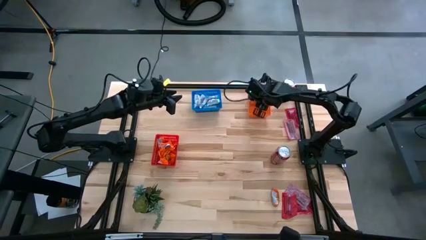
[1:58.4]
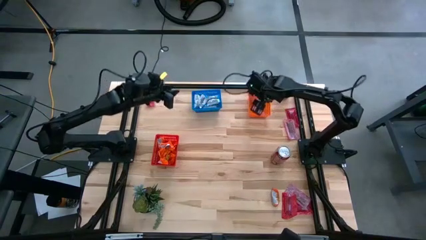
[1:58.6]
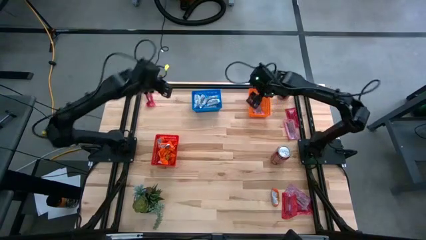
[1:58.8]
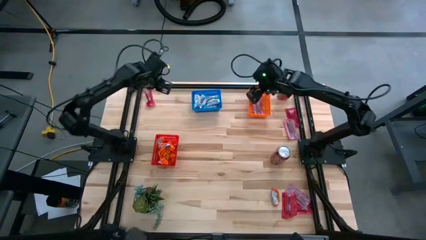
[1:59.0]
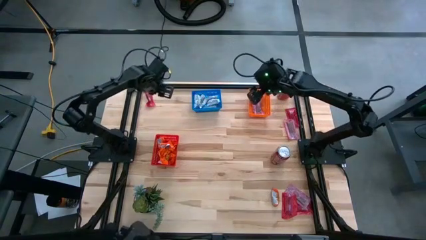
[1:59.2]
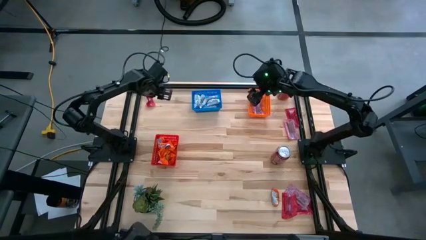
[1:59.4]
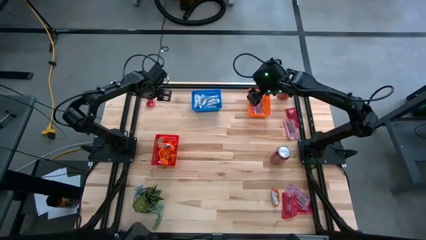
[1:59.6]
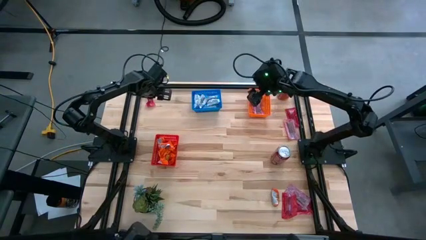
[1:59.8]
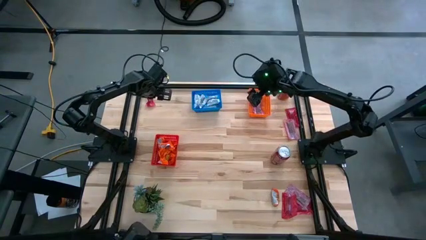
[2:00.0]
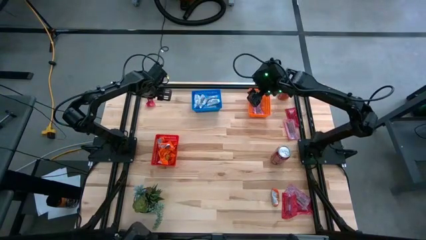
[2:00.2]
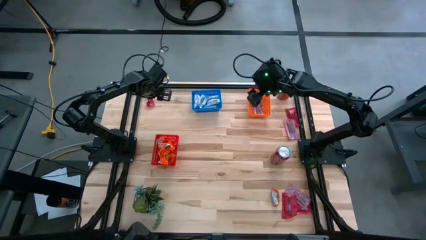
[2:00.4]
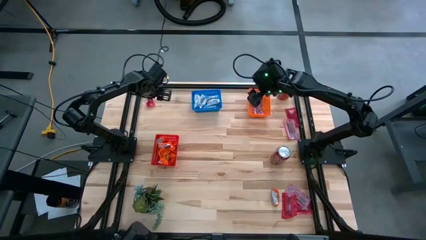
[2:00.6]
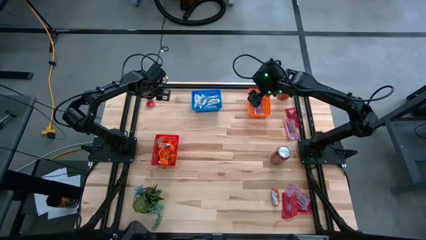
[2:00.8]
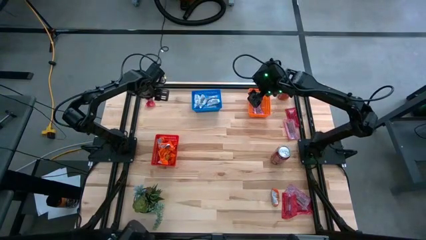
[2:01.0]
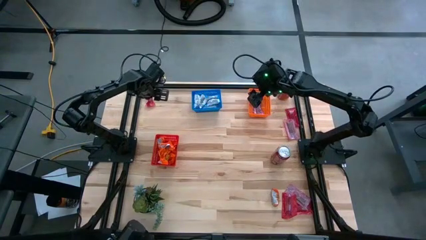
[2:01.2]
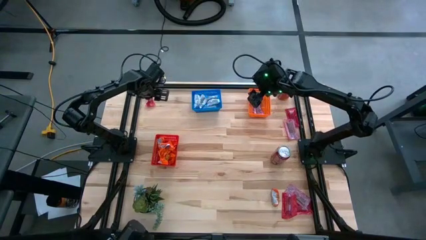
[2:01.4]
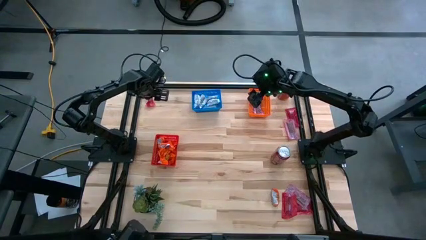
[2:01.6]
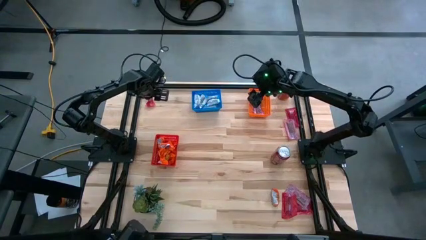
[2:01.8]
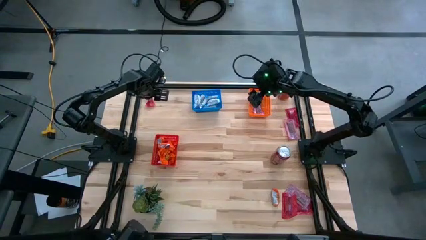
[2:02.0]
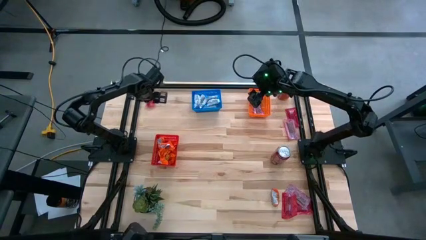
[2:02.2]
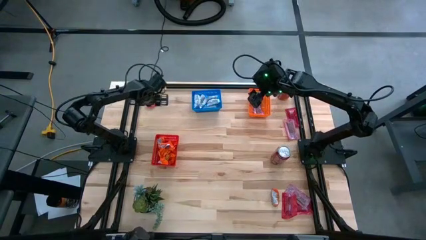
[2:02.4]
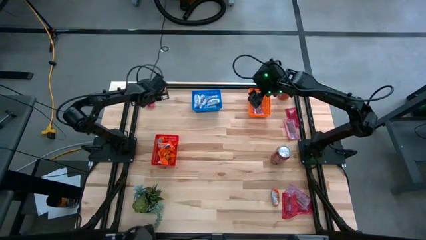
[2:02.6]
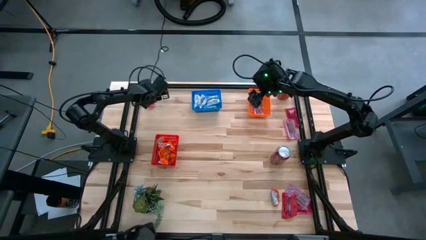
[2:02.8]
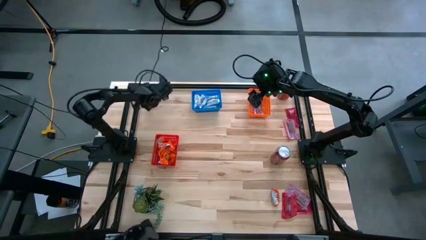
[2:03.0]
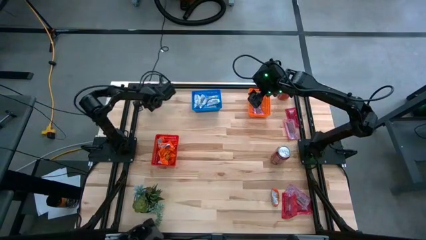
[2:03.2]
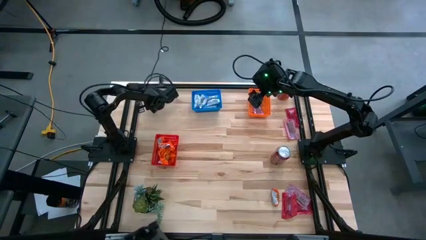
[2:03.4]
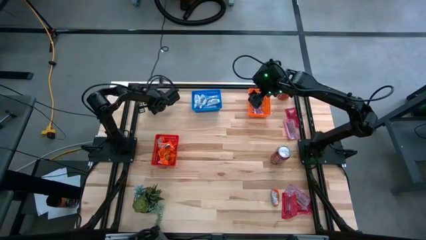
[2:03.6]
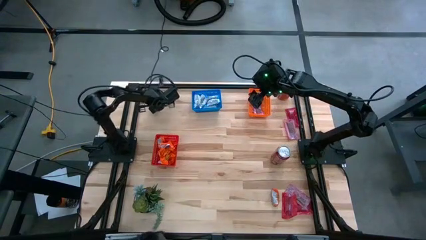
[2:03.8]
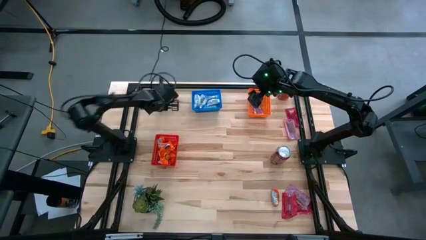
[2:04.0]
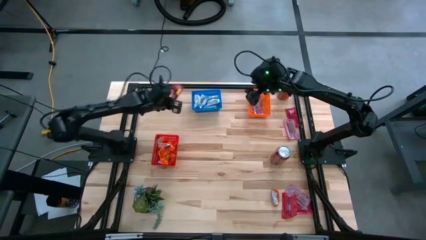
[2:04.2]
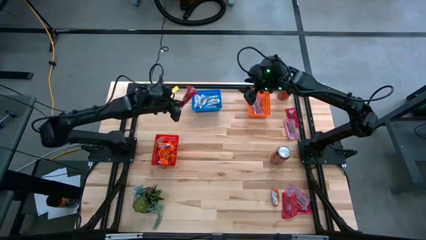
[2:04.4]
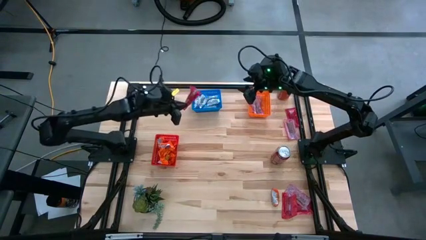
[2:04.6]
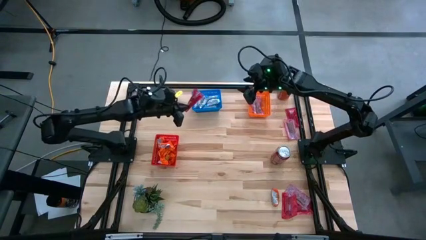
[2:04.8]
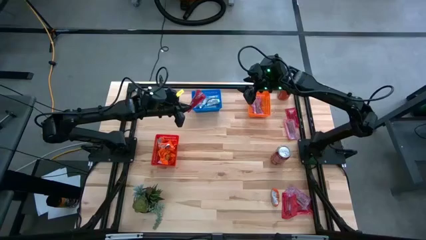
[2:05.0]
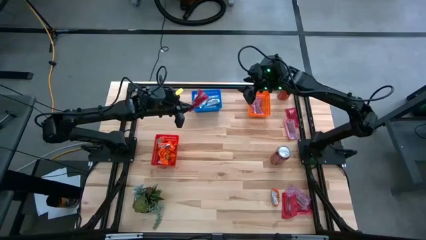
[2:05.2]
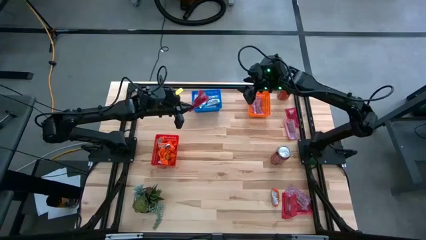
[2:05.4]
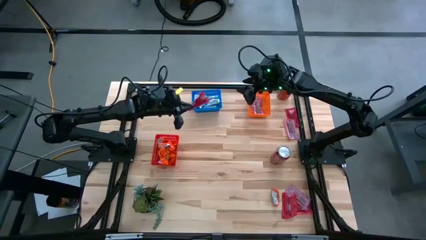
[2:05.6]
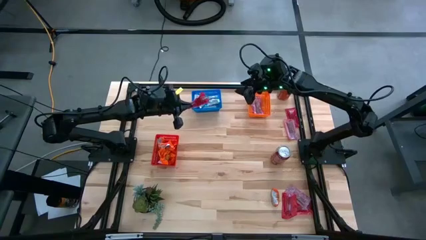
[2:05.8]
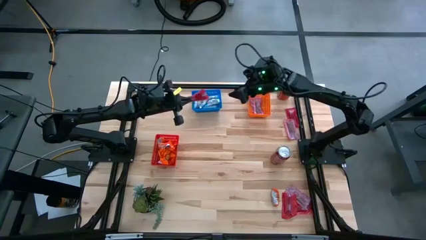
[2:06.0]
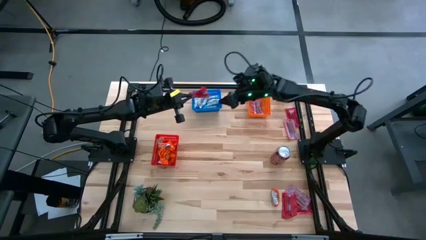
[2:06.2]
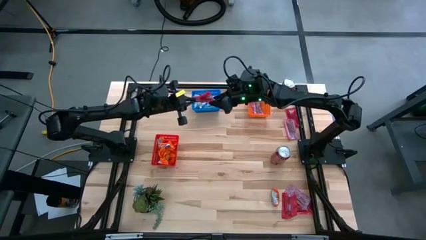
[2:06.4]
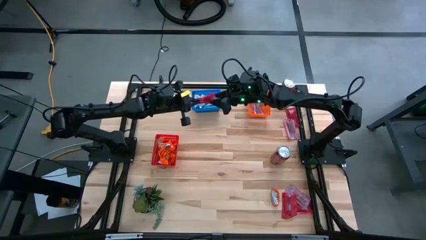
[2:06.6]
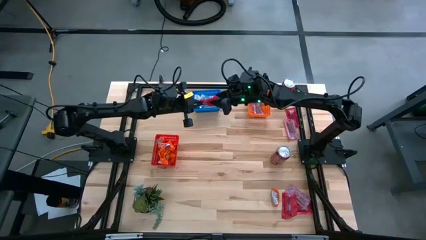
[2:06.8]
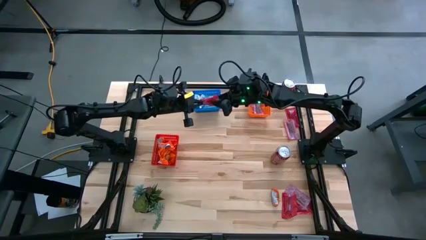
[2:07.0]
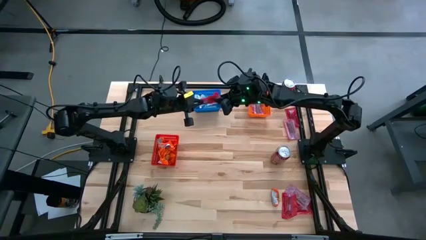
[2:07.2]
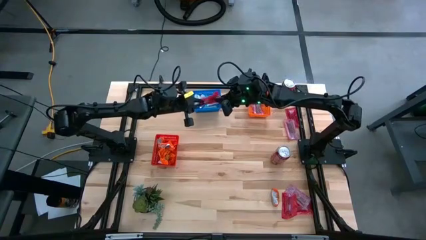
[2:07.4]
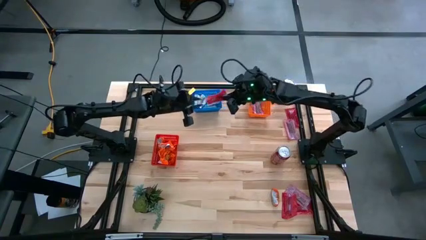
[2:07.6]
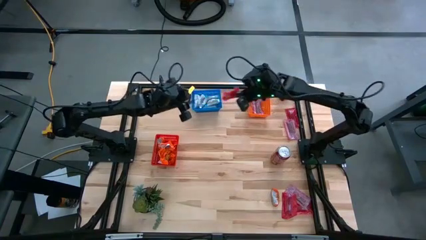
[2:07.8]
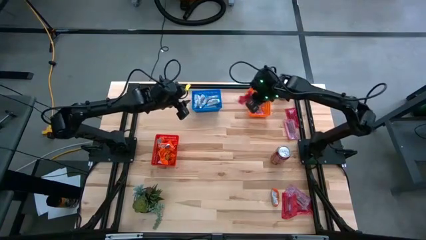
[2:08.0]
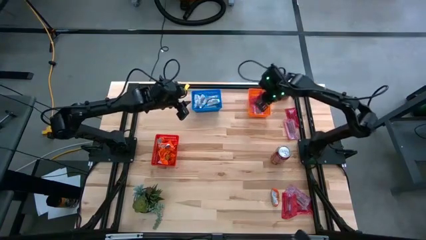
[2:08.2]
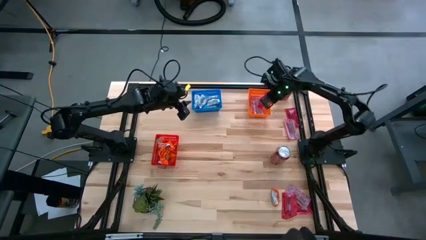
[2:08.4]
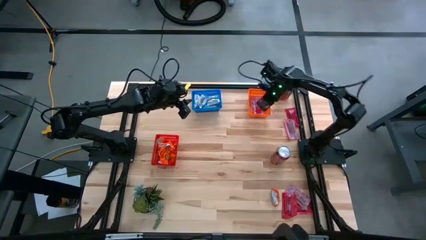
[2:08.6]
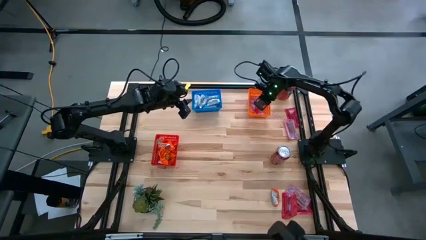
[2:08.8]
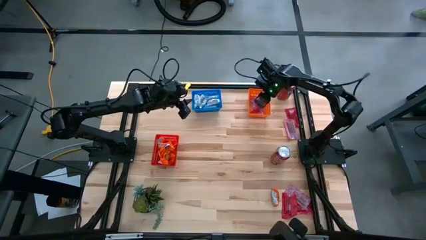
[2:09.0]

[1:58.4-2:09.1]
Task: Sort candy
Put the red candy pack into the orange basket

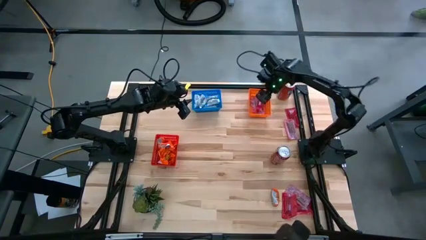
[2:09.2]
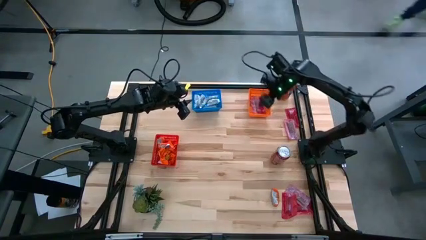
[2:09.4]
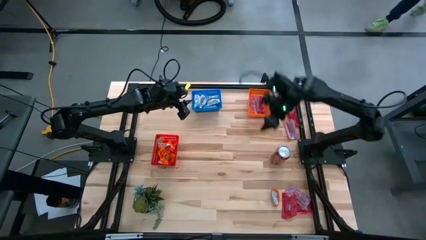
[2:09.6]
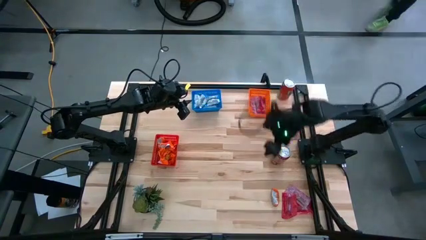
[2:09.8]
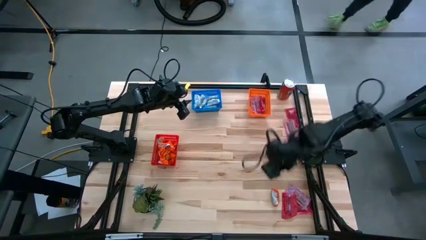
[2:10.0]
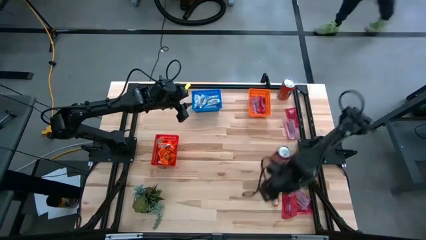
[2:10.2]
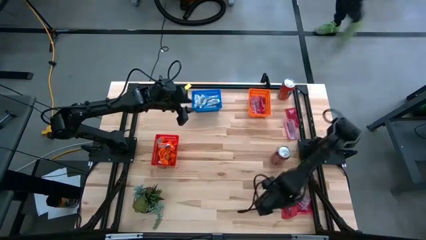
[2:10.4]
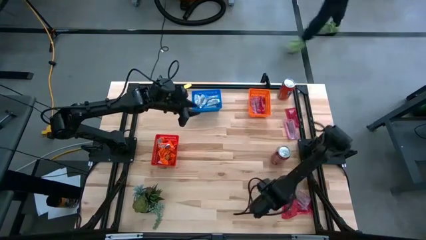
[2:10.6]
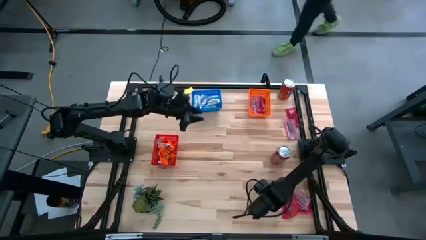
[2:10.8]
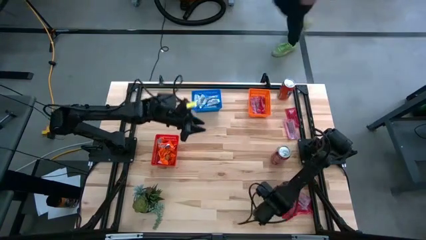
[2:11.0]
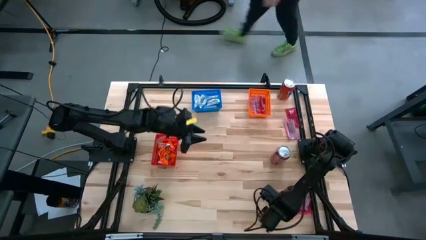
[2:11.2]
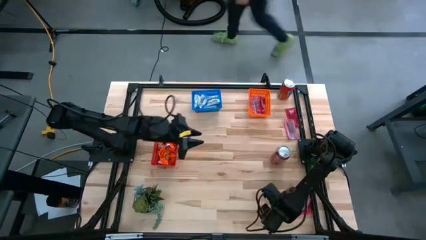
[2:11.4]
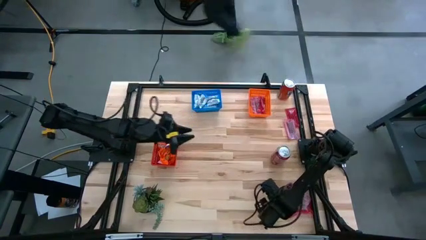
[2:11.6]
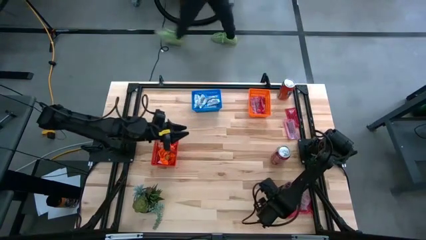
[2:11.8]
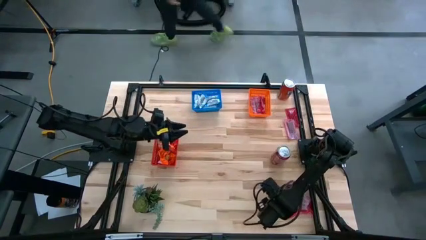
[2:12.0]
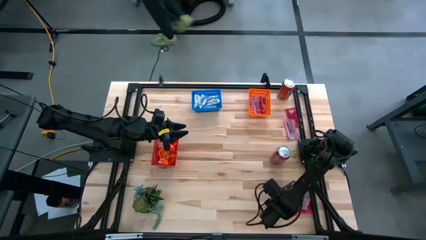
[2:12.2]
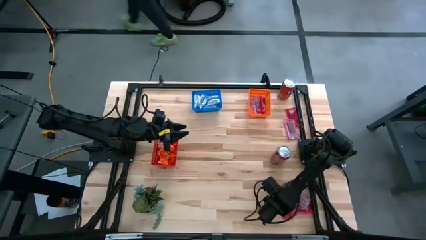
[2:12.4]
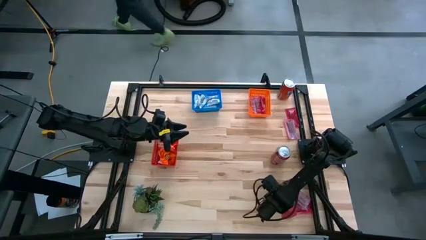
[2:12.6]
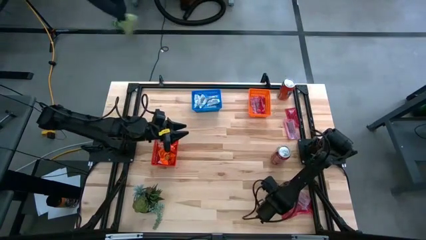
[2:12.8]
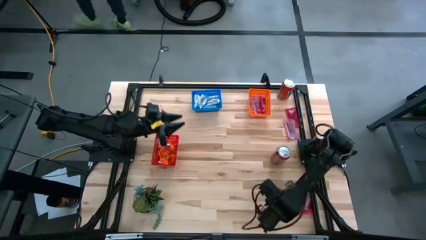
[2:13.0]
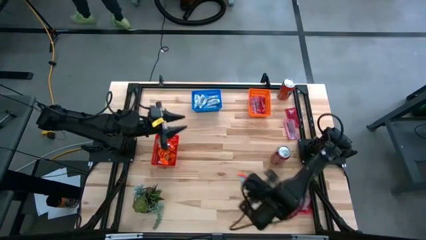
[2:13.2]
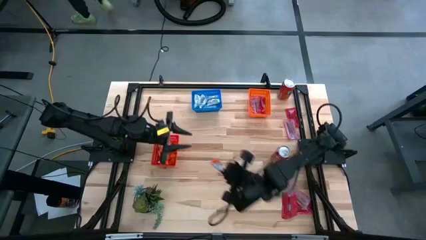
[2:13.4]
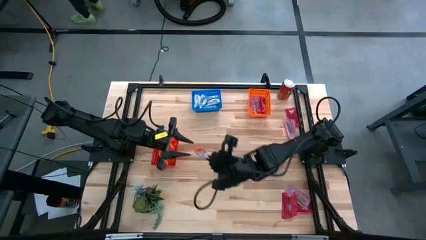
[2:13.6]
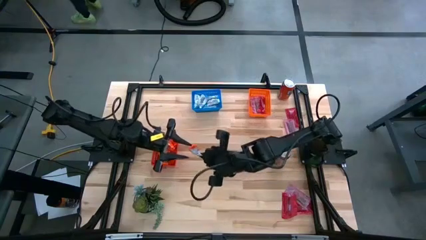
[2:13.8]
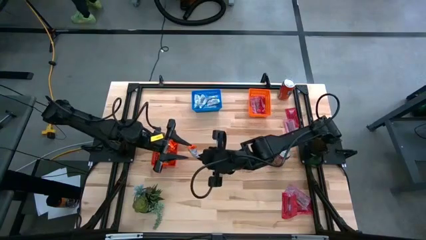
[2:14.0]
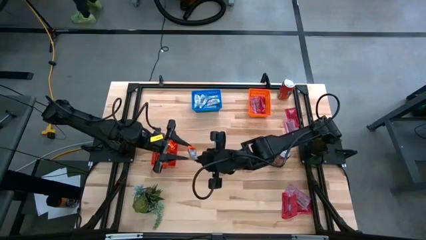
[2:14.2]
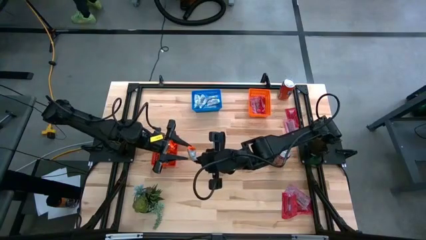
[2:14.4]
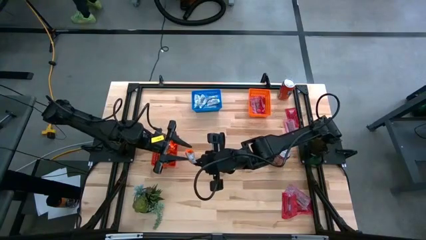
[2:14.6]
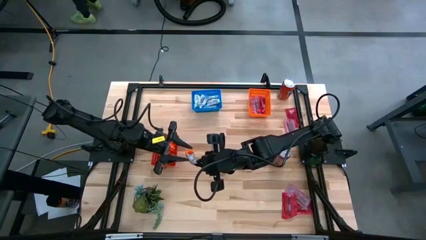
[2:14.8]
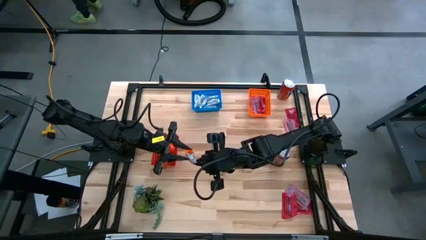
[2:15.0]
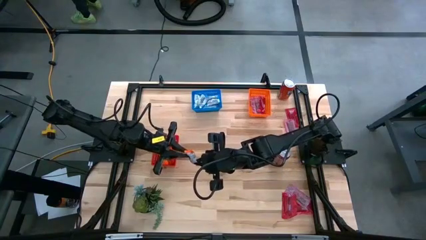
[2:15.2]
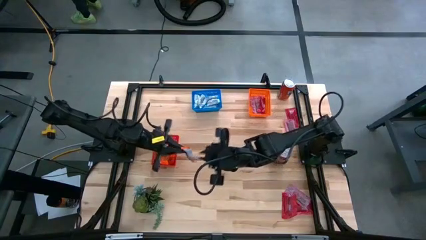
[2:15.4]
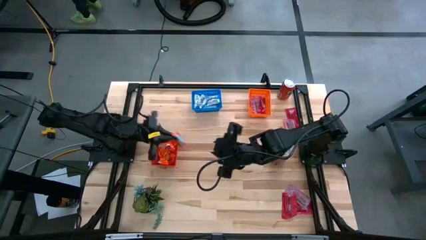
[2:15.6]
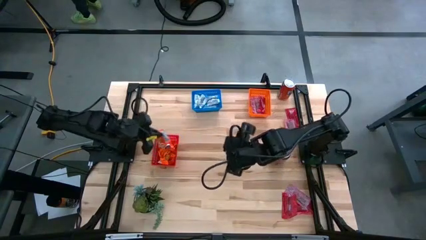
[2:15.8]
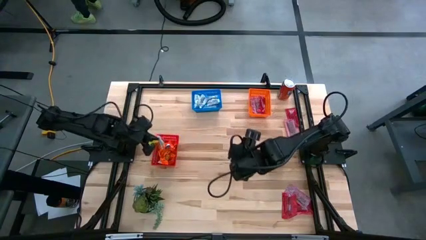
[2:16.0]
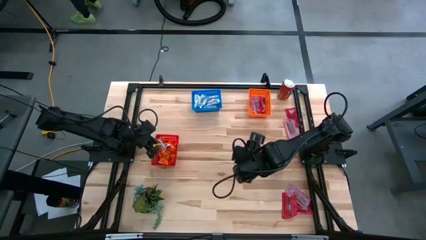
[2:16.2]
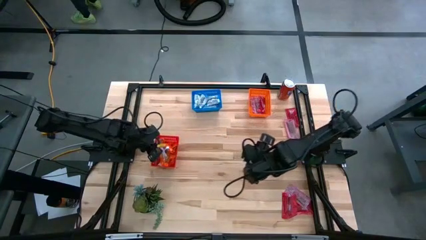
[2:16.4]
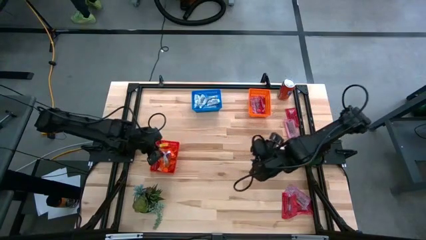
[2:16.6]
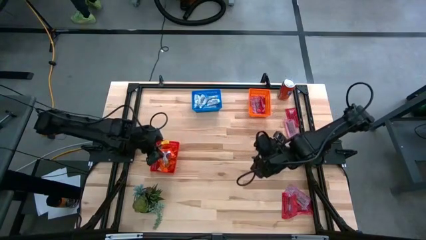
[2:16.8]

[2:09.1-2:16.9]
Put the orange candy pack into the red basket
